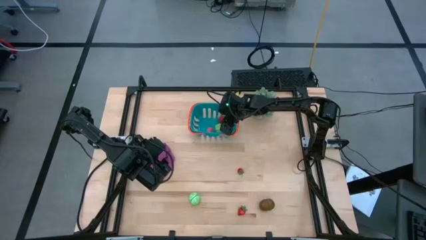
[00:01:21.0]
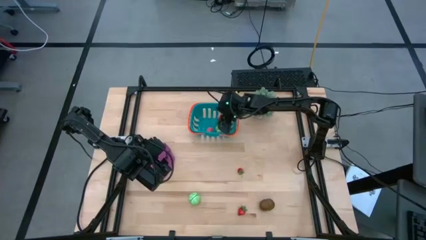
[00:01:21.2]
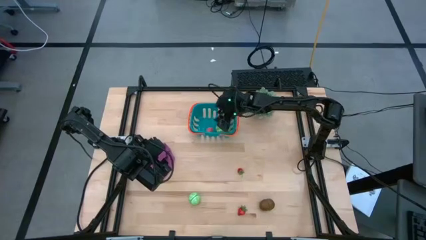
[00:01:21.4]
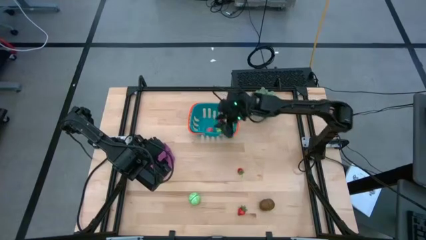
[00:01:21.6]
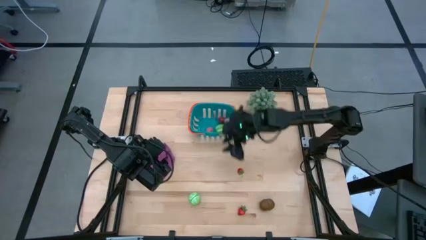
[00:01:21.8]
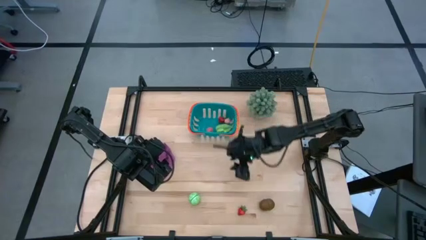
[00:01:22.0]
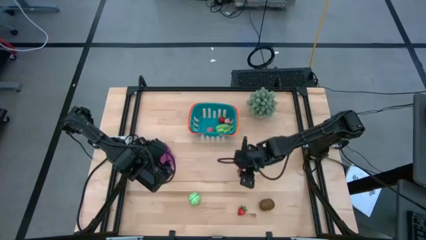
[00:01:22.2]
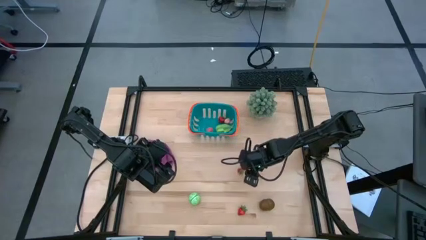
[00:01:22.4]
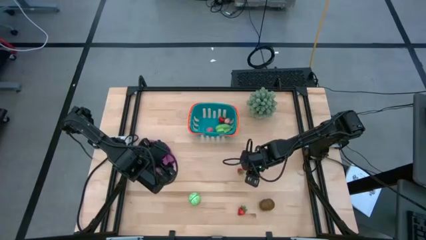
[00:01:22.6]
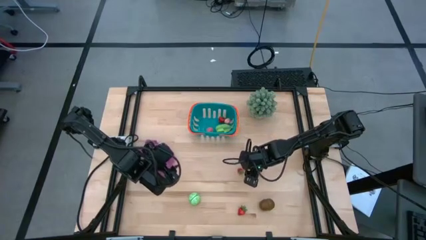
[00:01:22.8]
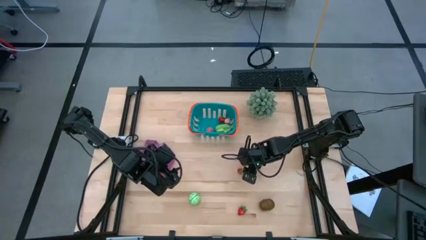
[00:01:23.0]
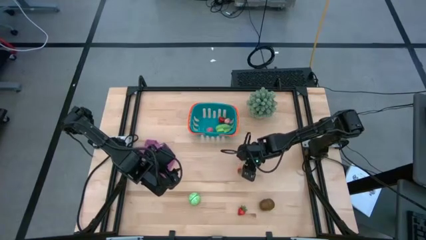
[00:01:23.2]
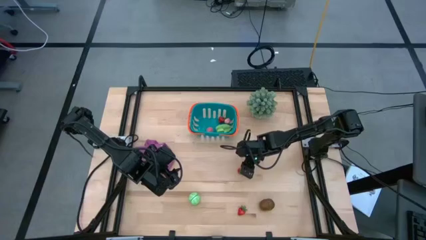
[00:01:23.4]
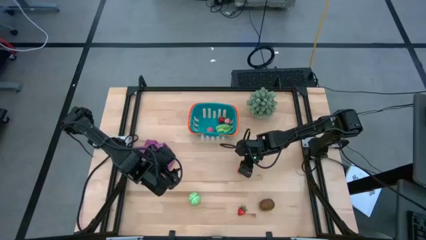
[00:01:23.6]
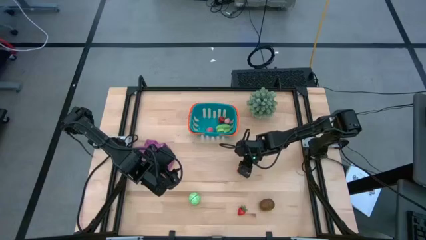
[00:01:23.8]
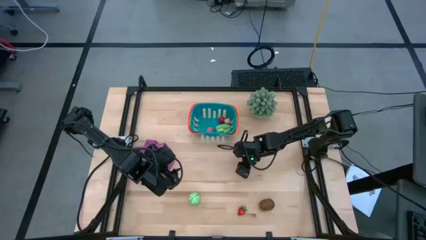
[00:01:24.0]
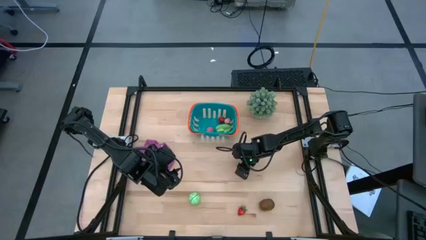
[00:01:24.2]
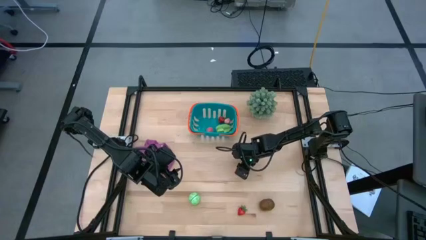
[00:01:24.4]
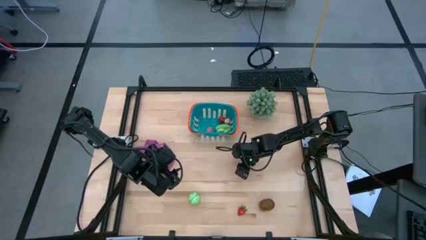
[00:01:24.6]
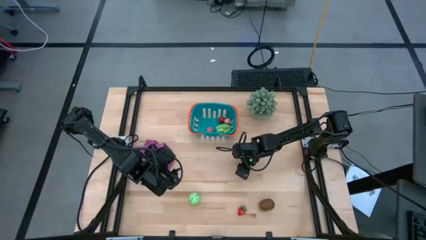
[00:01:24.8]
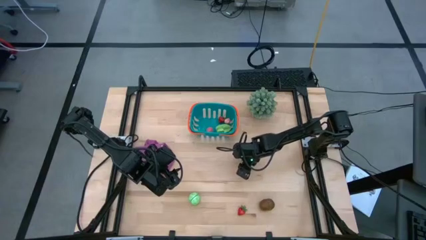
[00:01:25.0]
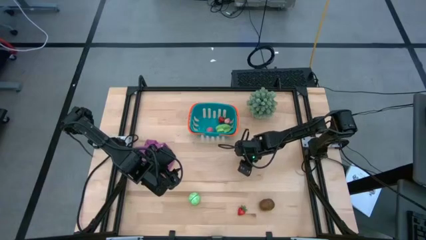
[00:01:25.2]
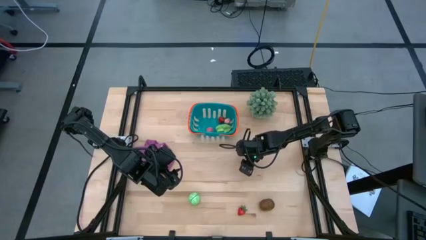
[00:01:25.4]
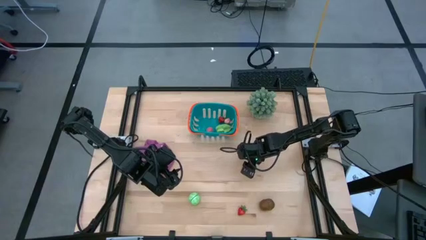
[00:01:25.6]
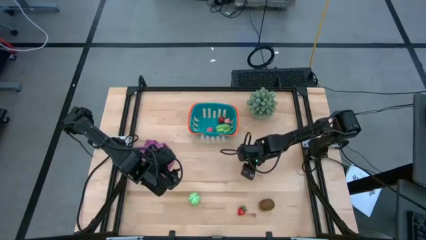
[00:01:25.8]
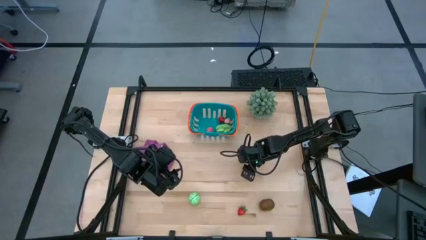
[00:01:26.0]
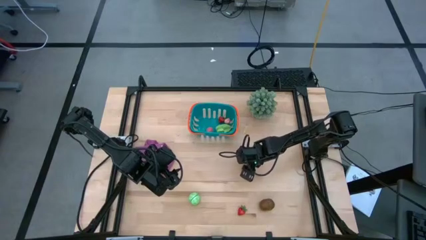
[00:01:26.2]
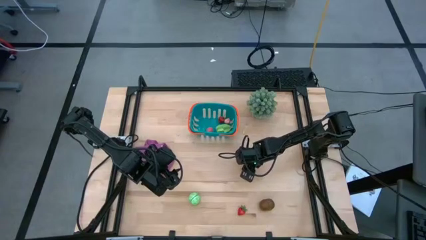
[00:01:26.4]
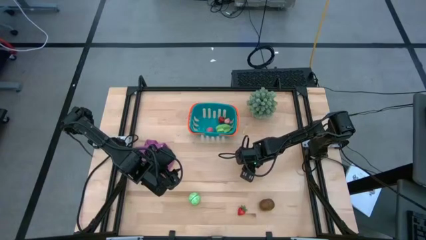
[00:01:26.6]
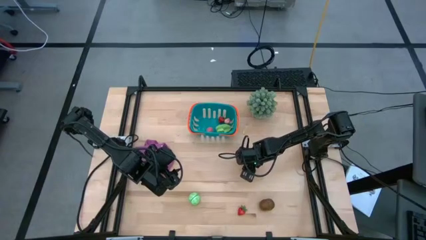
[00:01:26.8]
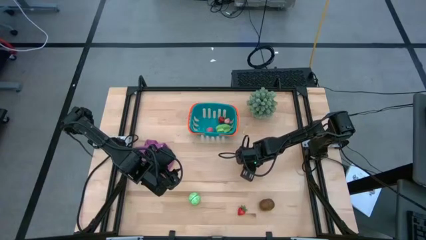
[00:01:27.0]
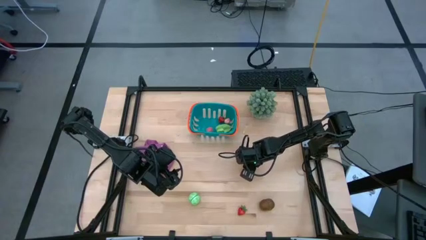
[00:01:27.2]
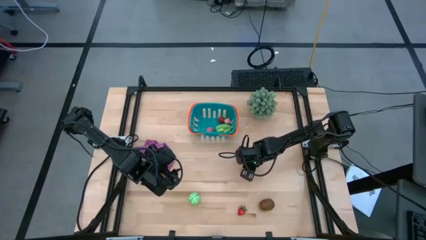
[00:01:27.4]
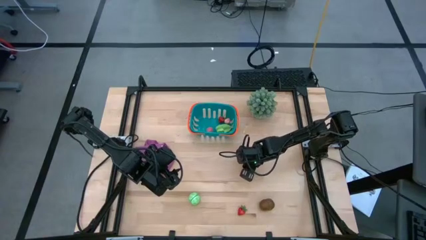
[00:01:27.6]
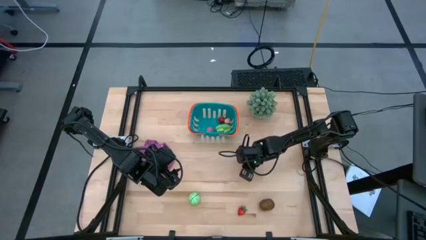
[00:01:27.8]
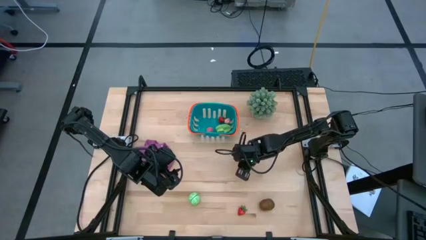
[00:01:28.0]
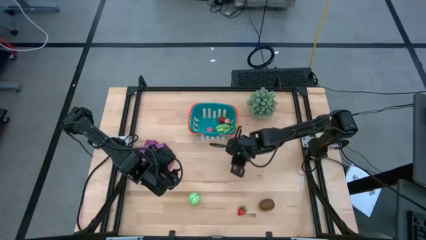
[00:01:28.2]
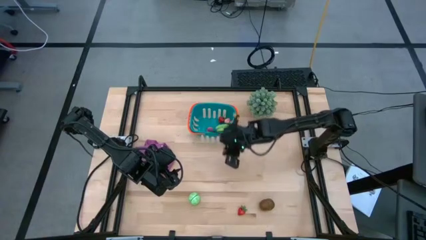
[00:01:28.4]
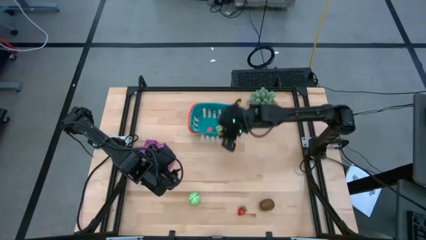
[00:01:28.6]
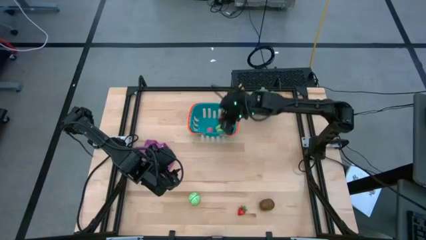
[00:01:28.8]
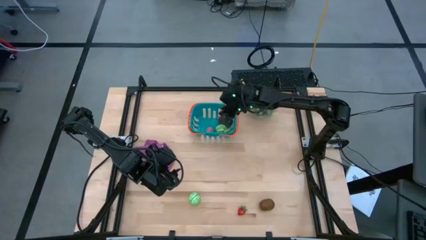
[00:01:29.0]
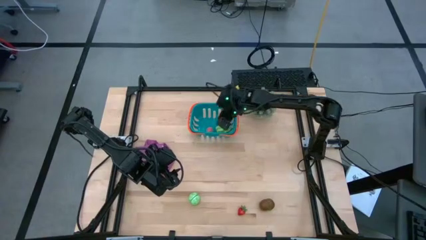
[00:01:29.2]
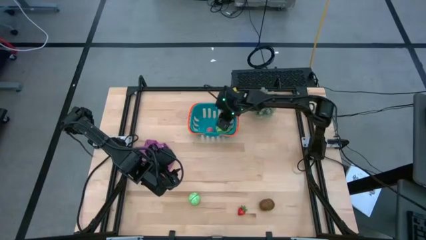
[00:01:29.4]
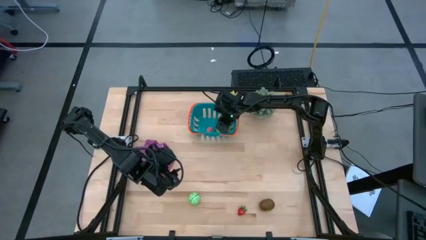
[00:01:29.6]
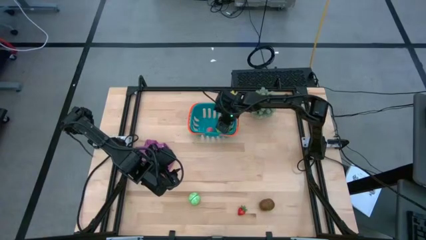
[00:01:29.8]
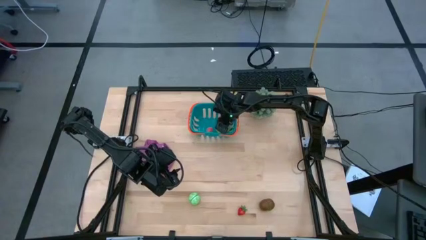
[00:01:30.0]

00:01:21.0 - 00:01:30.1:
Task: Pick and placing Produce into tupperware
Put the top red strawberry into the blue basket
